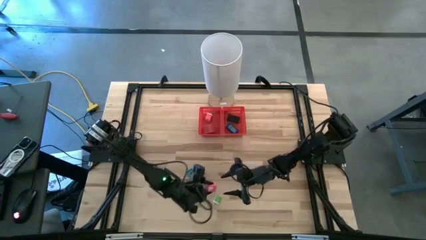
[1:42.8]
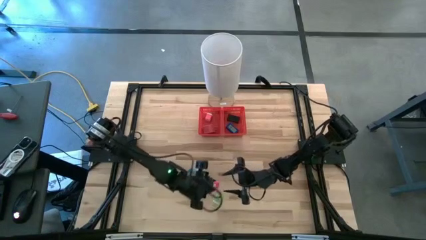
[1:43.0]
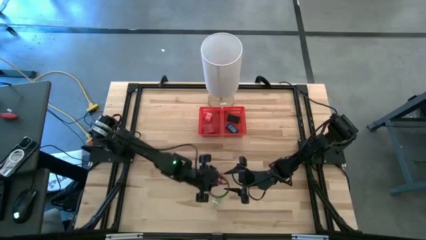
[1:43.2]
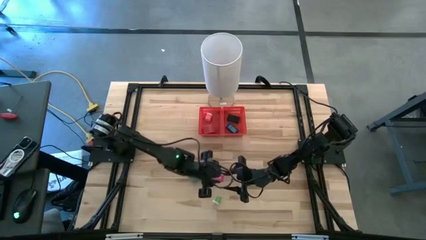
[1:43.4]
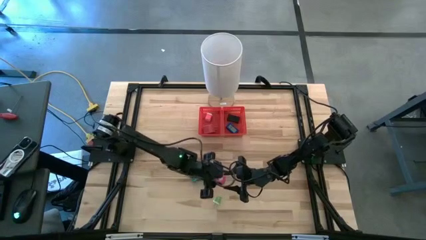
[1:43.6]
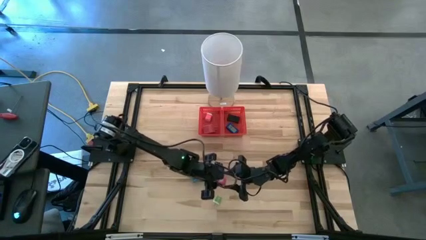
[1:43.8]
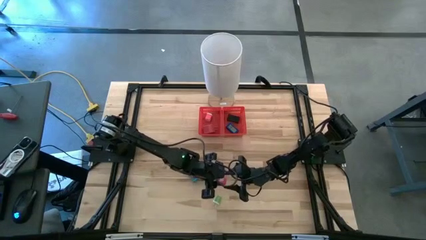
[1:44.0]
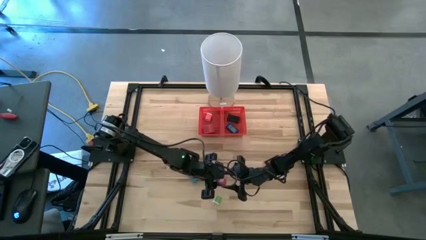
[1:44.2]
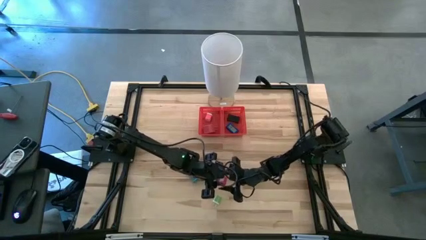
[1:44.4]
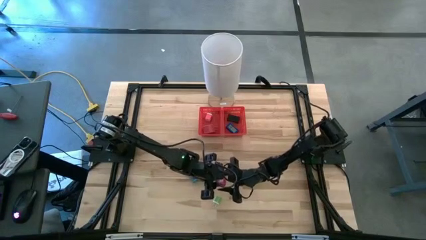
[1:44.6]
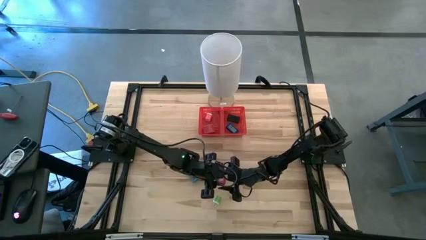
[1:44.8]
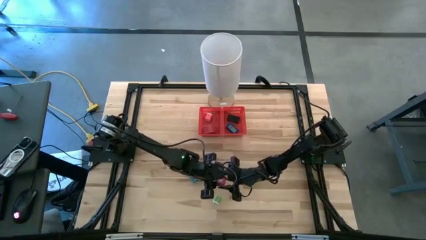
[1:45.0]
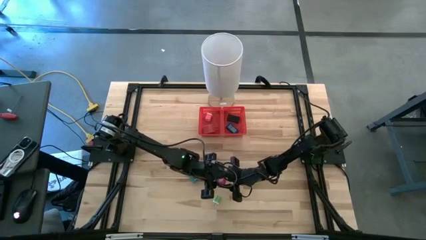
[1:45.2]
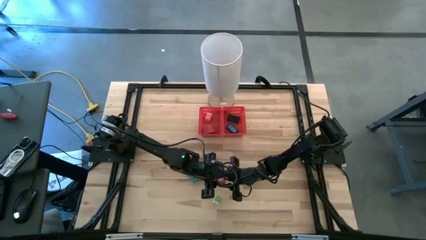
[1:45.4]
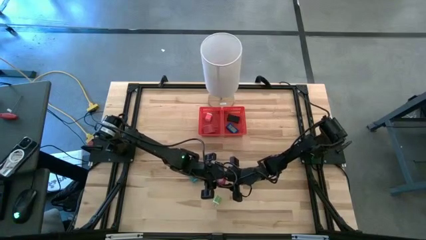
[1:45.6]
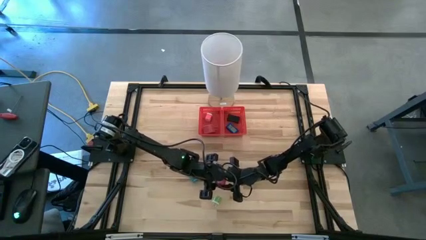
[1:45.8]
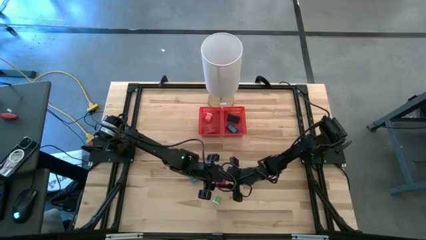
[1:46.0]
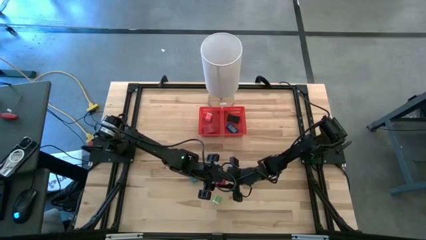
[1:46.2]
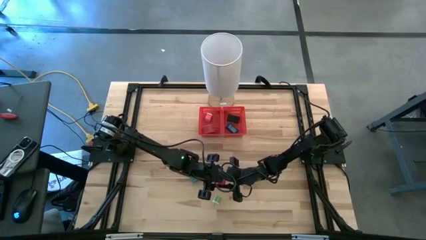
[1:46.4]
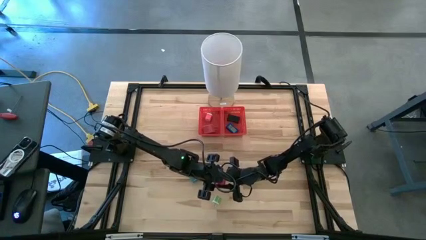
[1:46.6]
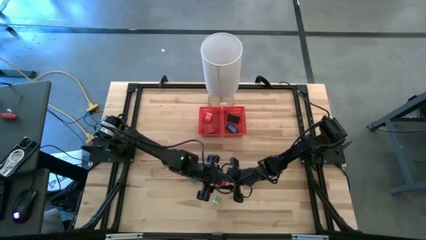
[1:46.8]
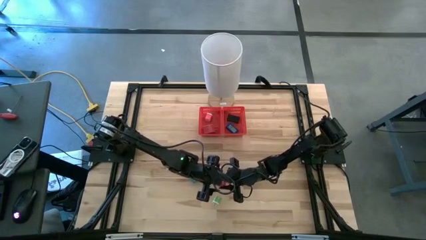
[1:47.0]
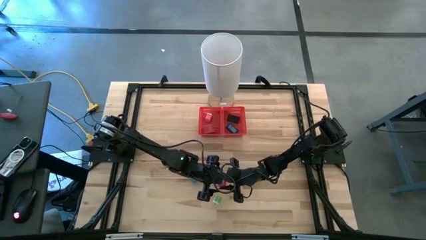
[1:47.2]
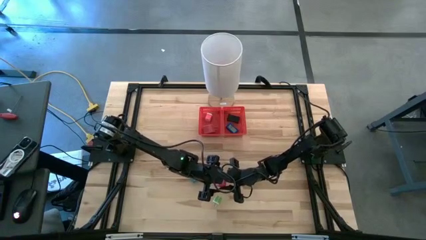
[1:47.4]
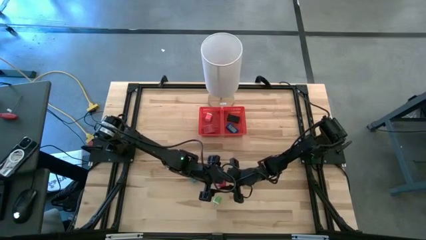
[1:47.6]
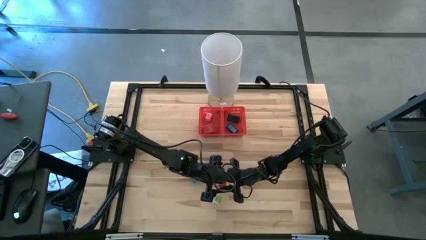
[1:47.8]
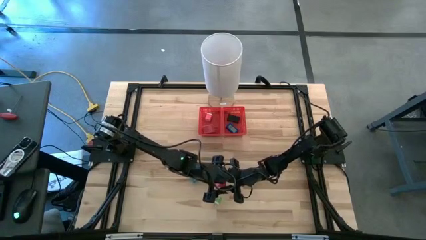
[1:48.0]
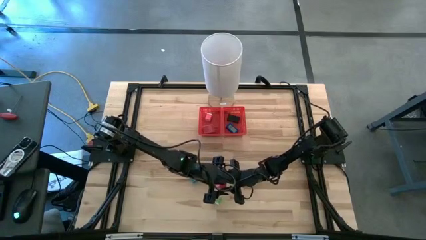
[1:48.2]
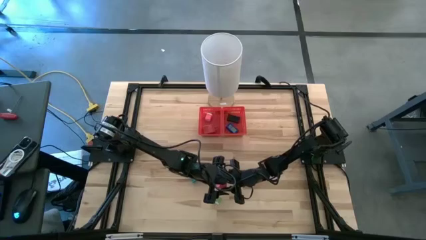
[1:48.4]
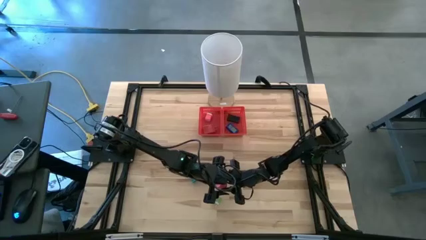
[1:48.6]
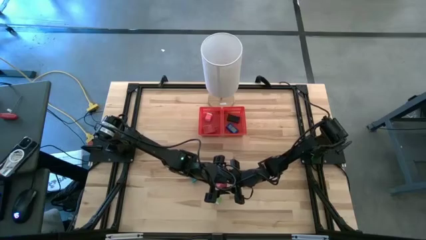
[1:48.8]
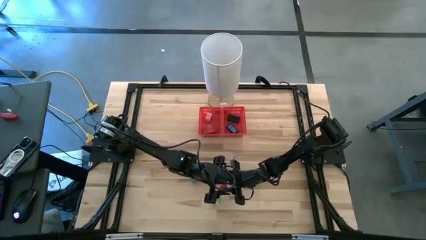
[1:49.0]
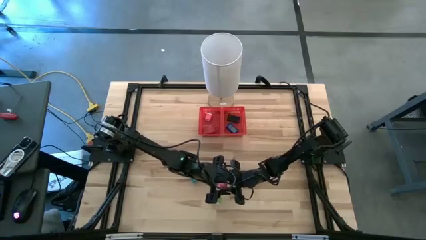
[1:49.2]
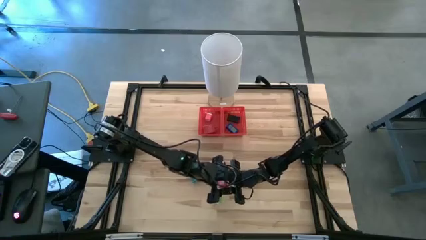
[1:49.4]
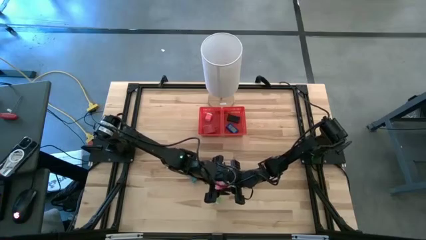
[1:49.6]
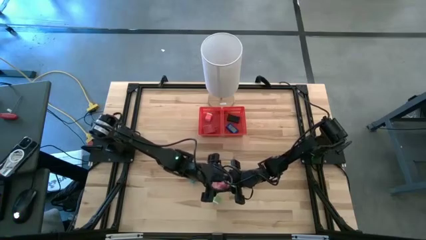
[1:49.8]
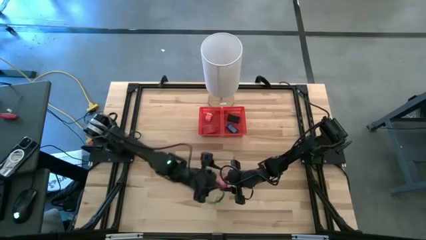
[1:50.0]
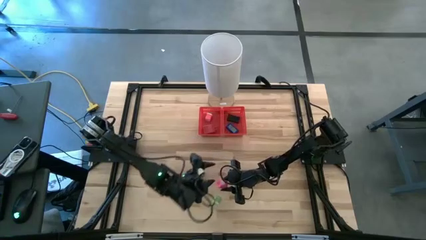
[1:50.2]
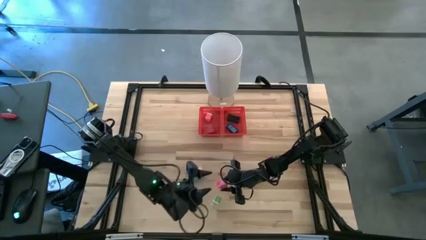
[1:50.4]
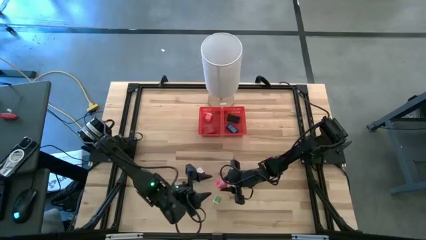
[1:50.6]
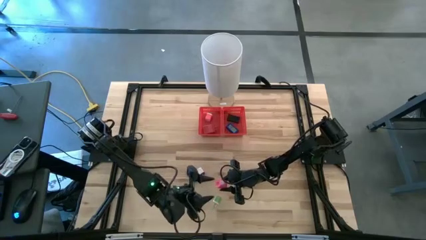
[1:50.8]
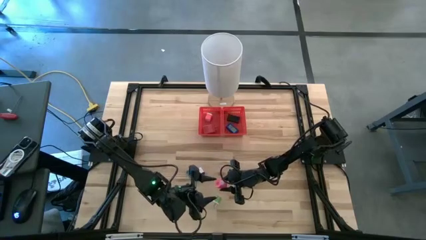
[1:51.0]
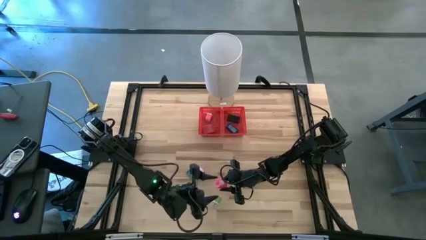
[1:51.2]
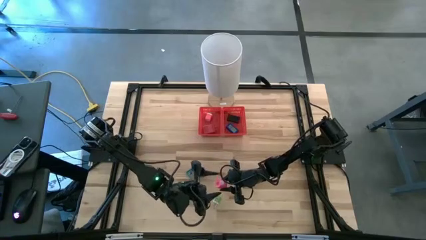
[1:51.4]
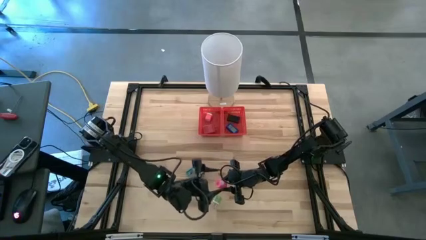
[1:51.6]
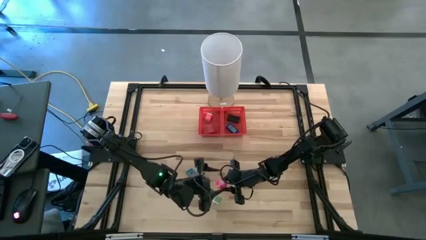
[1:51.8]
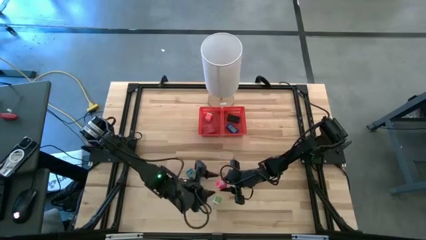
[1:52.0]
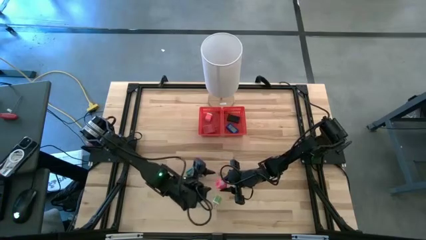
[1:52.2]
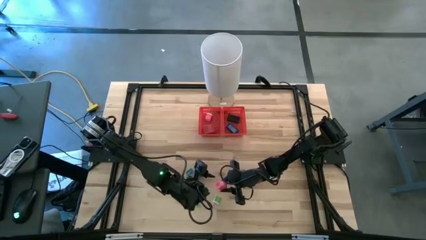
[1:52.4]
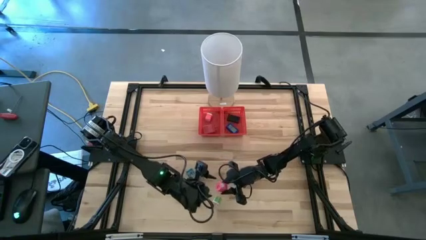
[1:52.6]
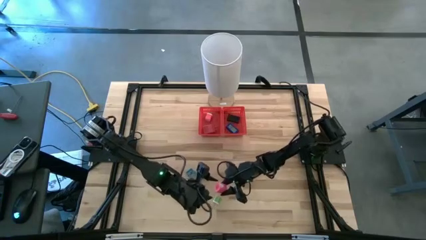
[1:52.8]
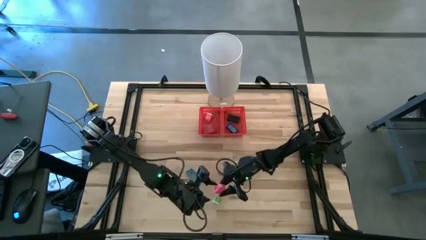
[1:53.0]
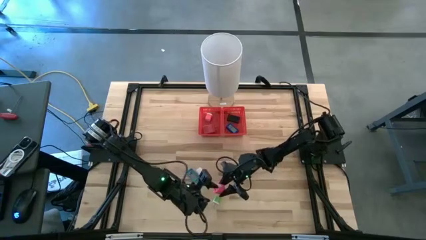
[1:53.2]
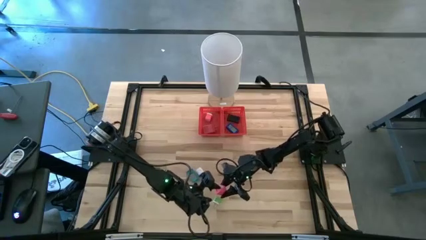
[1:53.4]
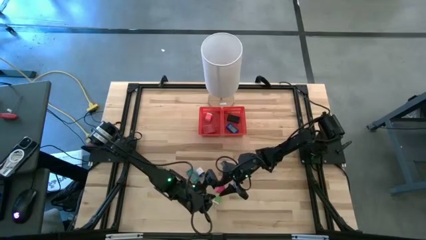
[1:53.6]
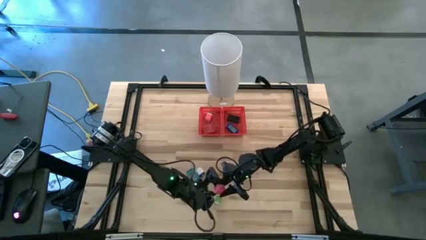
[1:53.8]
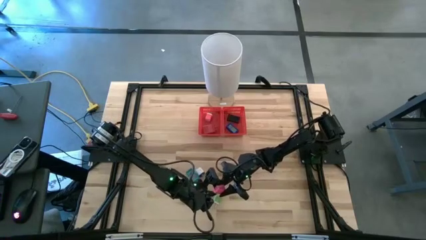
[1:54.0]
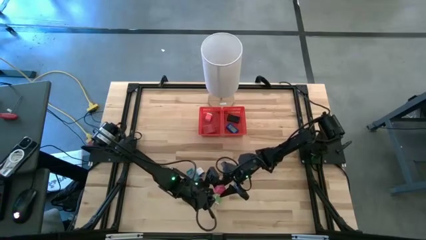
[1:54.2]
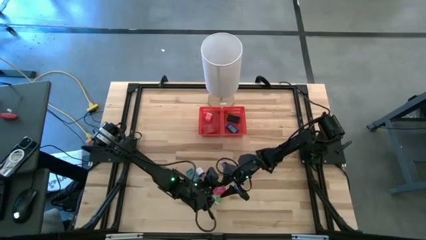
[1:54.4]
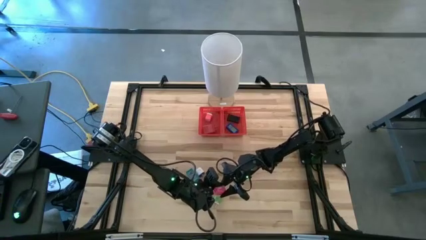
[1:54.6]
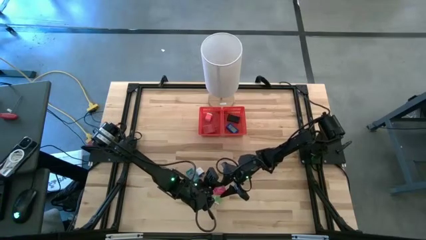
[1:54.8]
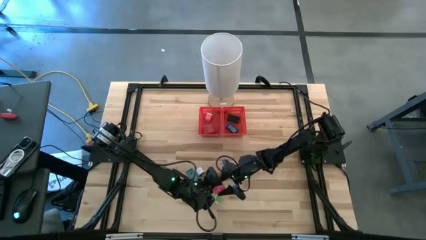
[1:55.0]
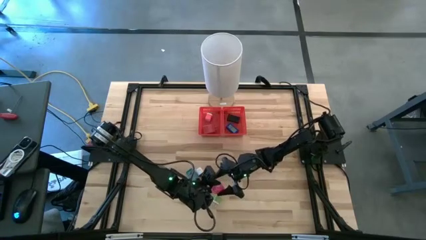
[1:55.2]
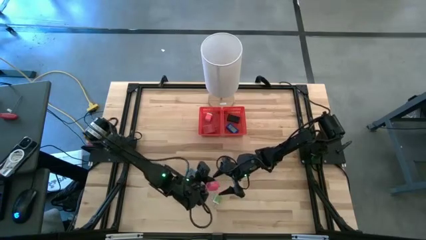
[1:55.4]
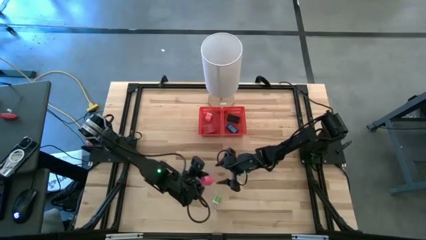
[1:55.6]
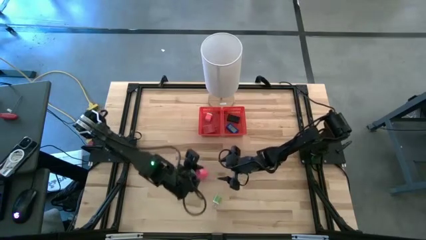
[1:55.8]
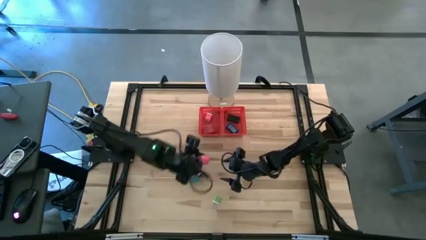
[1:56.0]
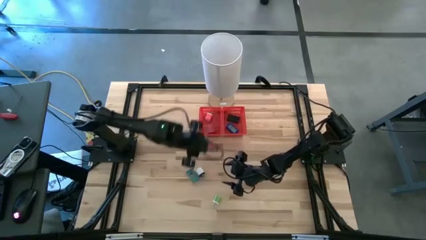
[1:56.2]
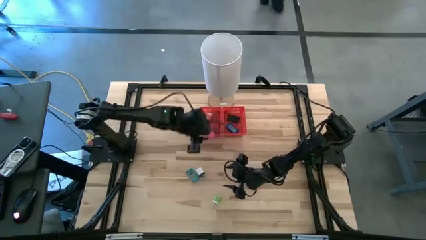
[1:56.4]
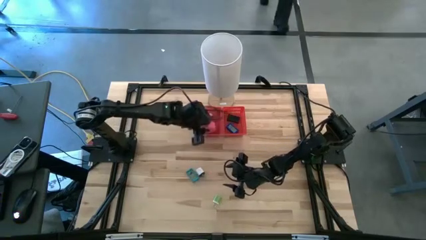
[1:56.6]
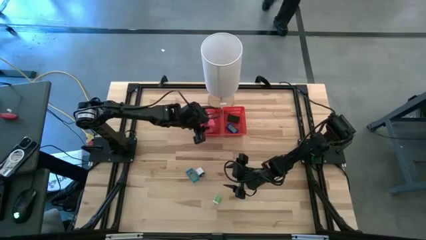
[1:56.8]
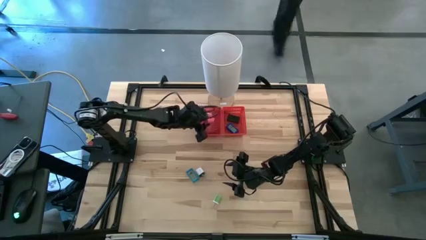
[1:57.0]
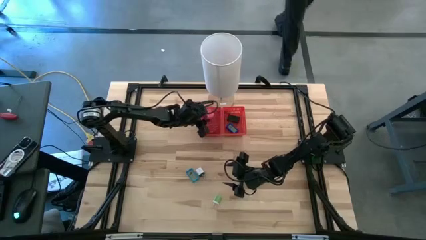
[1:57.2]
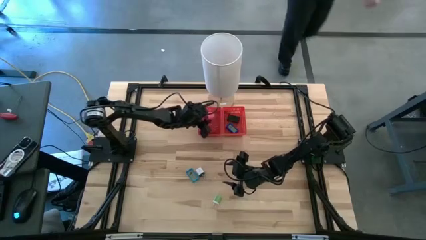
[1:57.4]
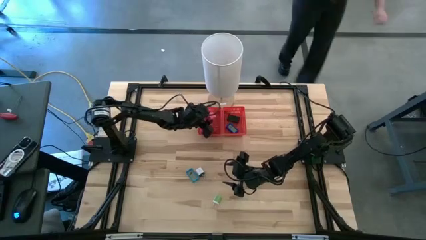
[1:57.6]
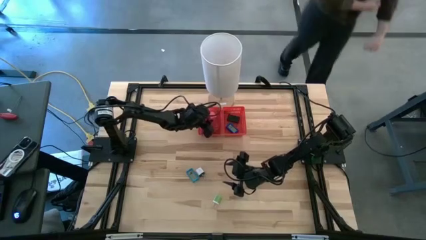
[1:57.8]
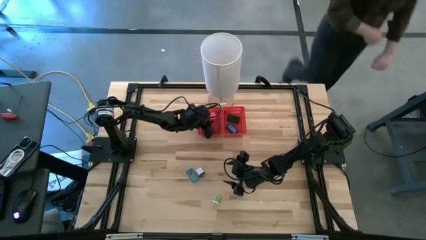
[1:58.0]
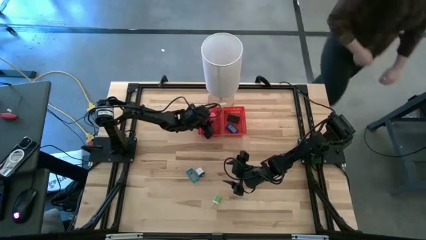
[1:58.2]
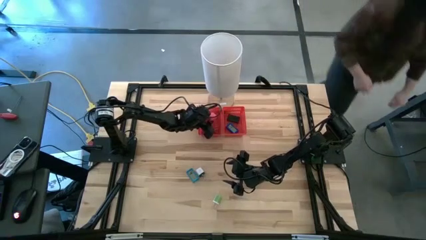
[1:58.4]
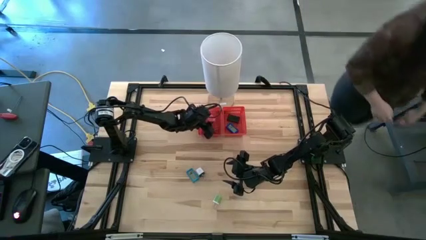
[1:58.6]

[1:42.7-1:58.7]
Task: Pick & Place Office items
Put the pink charger adapter into the left red bin
